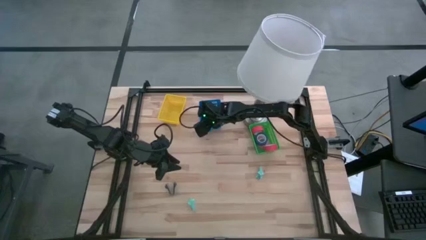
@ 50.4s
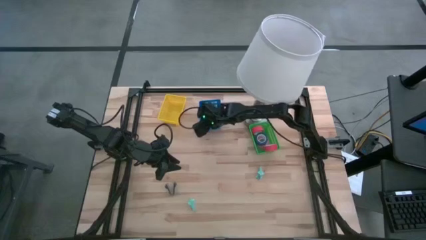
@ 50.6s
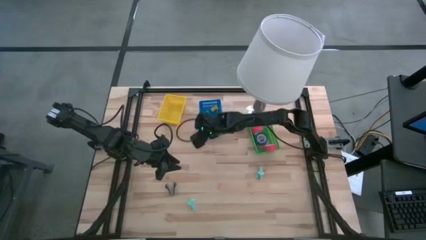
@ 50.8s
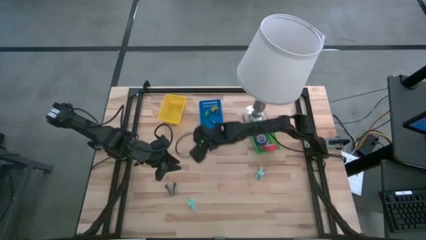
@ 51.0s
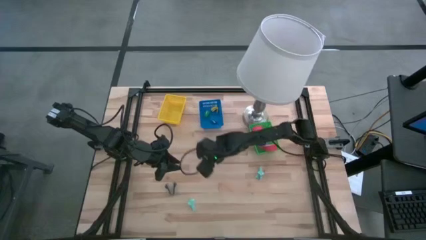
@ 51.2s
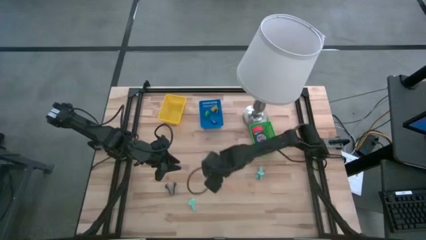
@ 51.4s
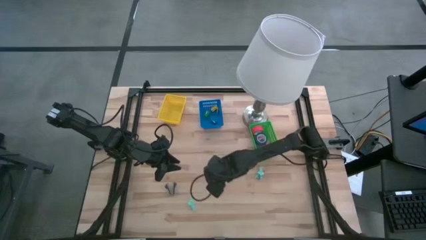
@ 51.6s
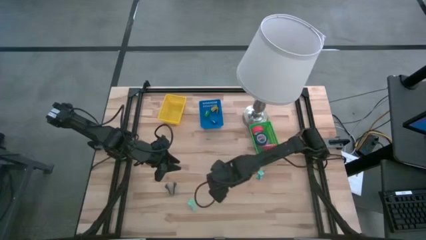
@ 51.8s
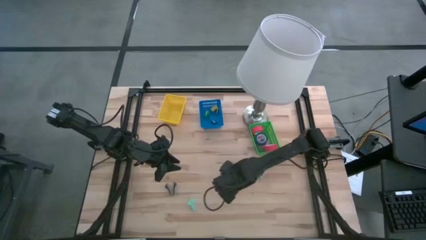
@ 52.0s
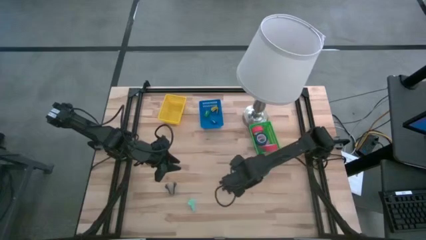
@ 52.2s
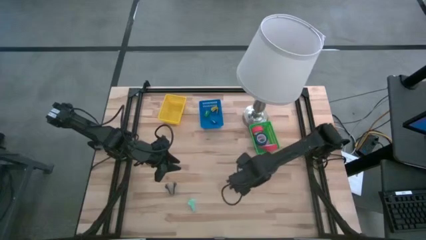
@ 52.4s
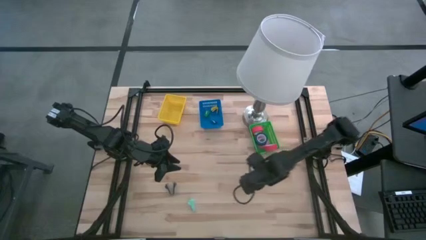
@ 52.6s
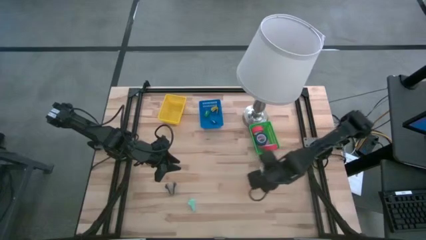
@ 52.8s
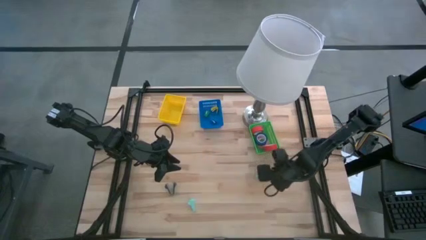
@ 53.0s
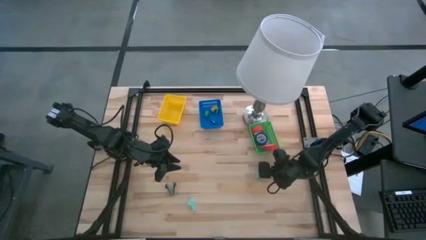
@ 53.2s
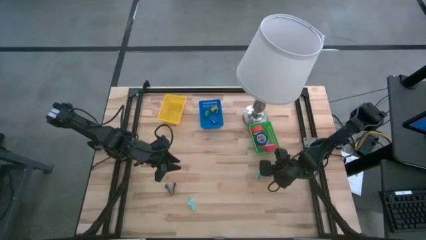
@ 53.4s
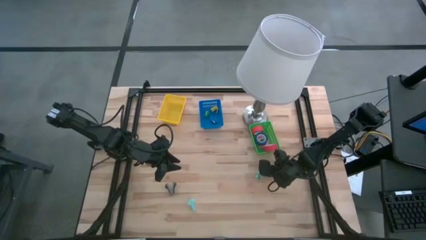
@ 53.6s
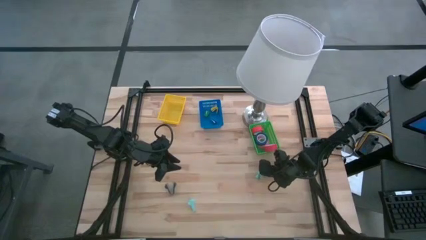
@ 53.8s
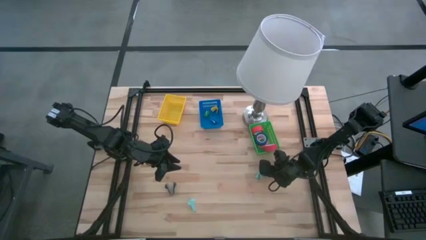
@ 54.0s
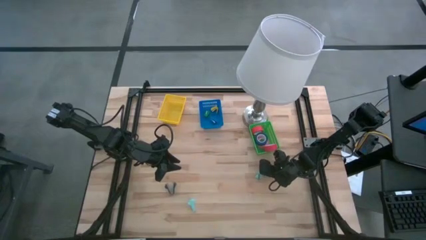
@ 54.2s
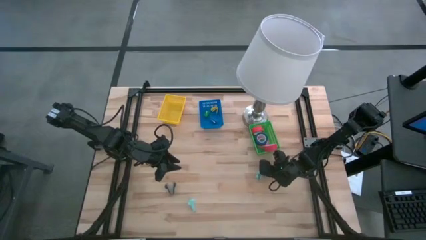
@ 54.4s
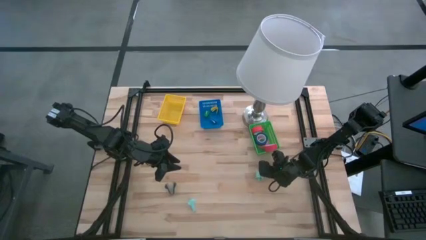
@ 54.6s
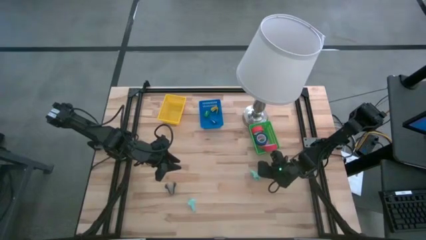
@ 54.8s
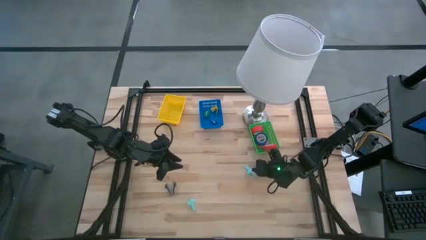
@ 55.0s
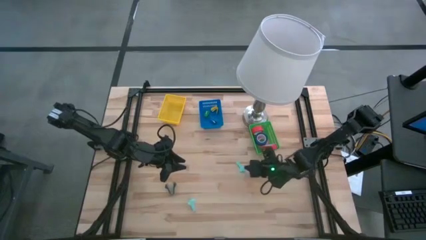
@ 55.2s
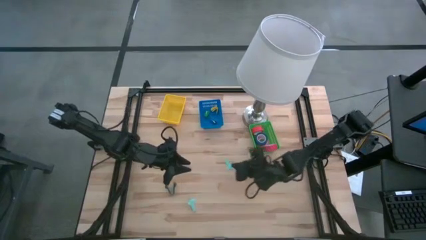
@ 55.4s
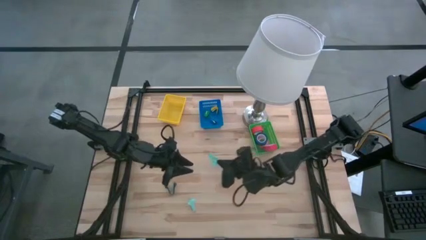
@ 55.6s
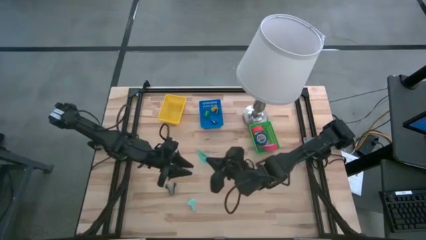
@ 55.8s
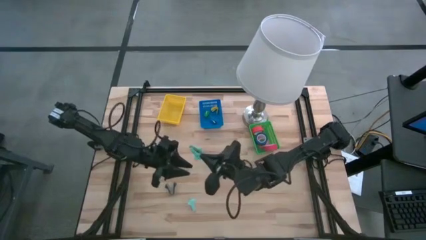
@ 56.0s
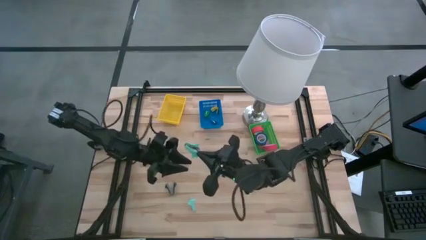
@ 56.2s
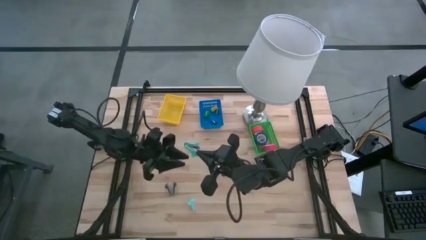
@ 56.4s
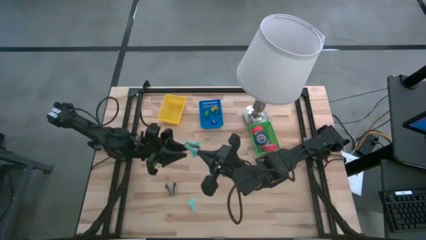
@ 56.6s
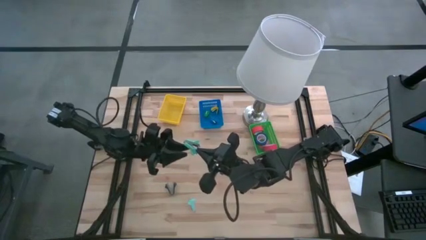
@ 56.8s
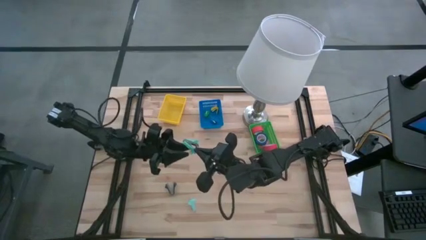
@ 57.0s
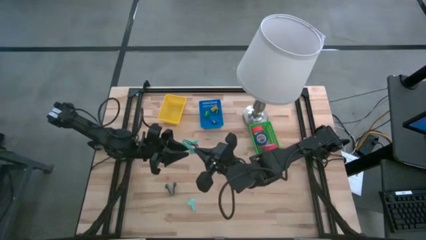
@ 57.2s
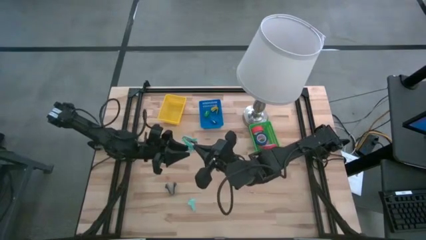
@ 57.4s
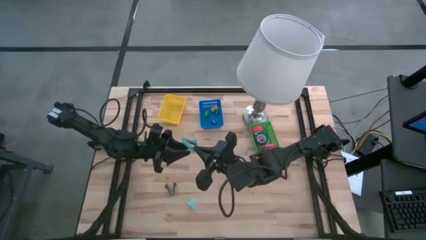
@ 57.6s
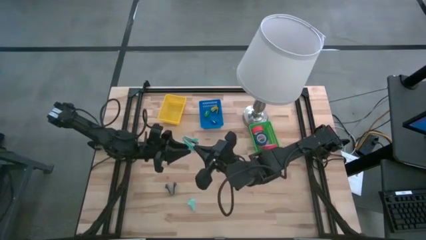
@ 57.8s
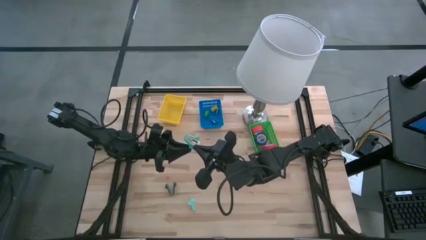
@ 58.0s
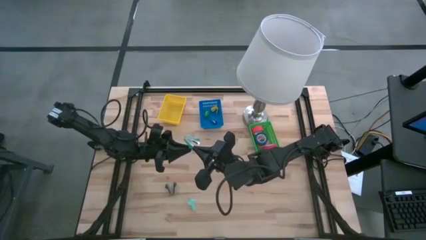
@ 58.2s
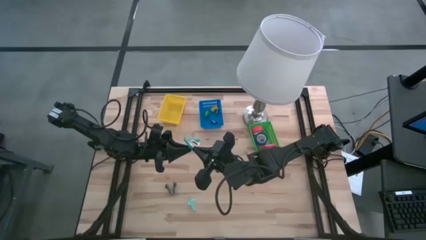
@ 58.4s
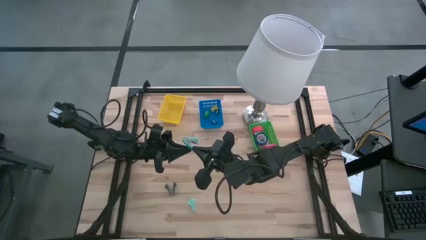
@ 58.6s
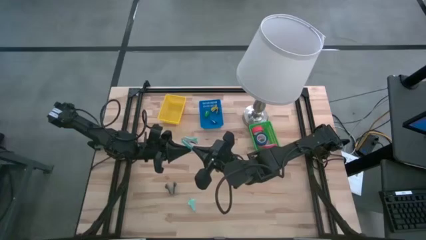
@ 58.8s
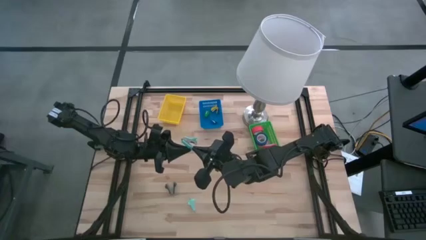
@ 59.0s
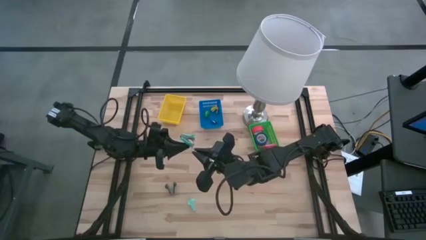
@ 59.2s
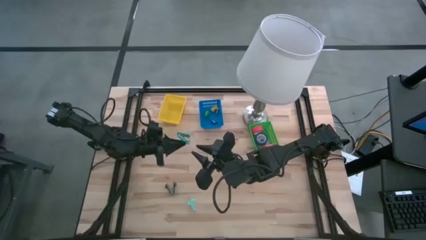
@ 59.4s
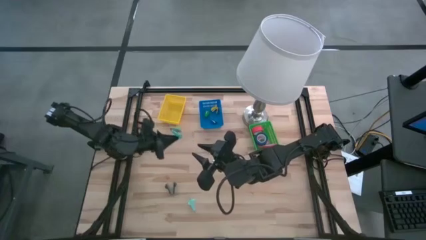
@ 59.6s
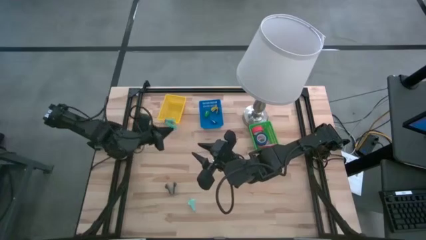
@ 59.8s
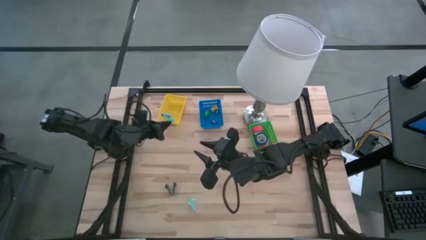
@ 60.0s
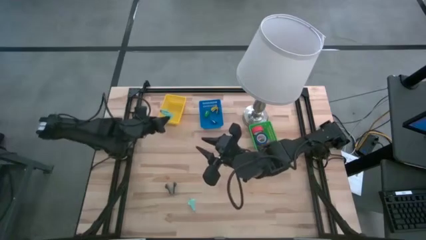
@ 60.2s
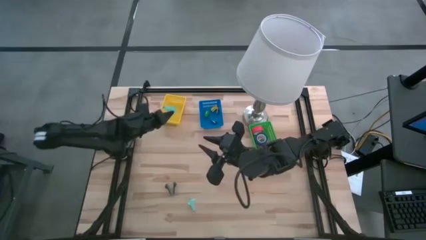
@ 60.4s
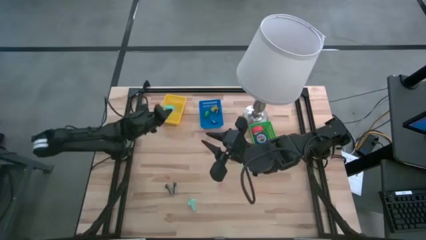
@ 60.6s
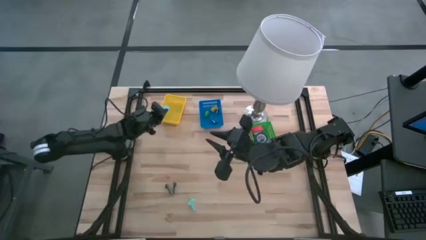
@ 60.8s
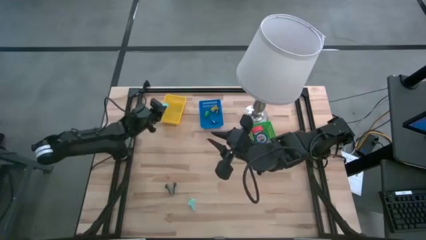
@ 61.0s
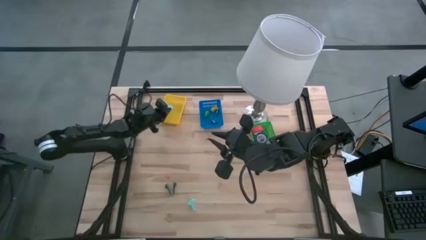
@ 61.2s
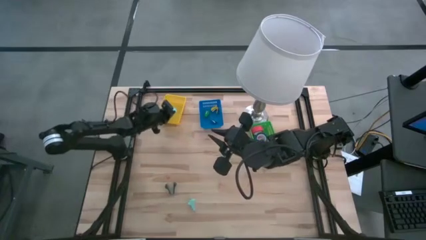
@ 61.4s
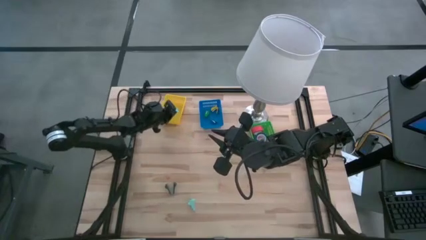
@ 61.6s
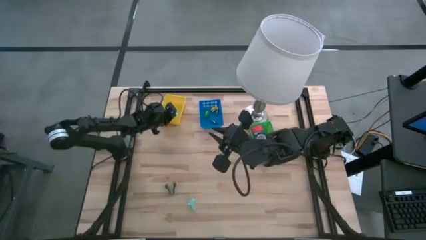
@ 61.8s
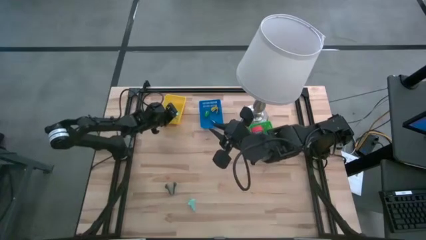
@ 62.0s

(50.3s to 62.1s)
Task: Pick and place Stapler, Stapler remover, tape
Put the top light blue green staple remover into the yellow bin

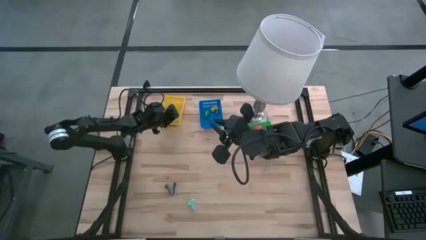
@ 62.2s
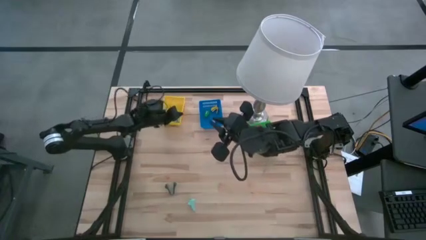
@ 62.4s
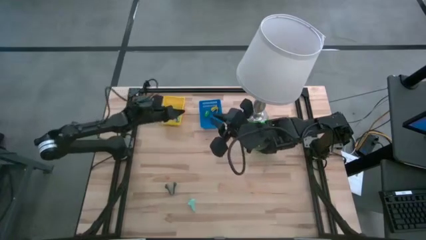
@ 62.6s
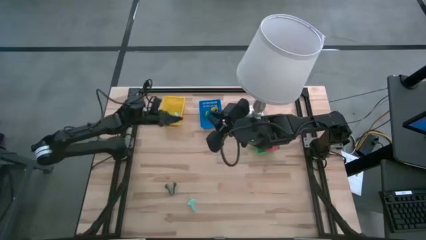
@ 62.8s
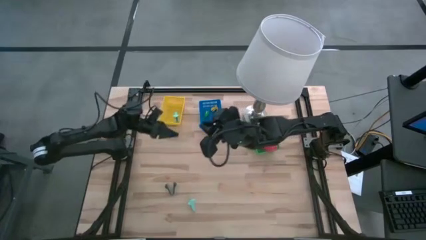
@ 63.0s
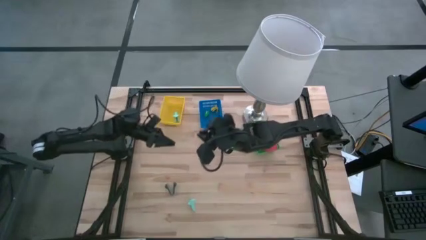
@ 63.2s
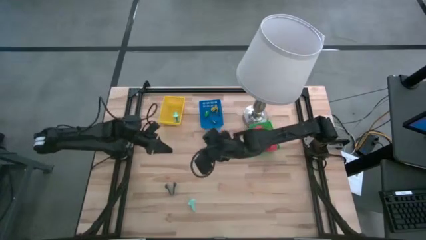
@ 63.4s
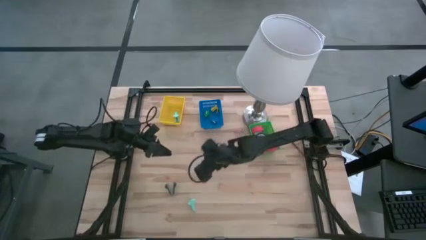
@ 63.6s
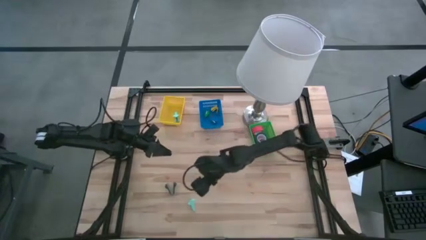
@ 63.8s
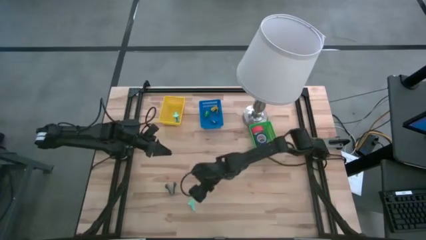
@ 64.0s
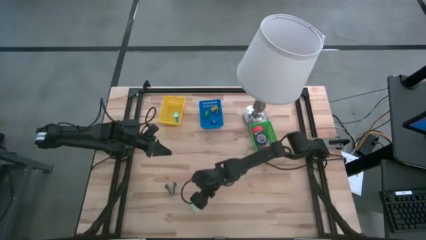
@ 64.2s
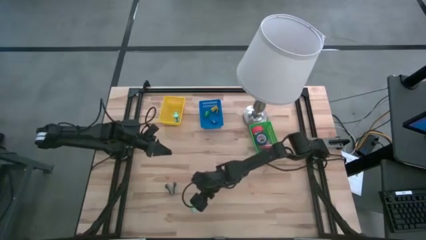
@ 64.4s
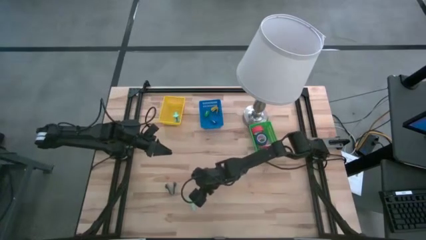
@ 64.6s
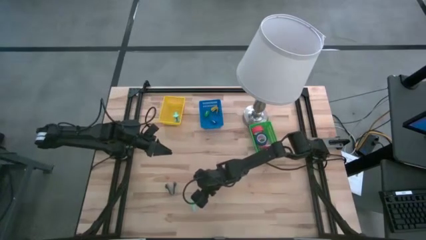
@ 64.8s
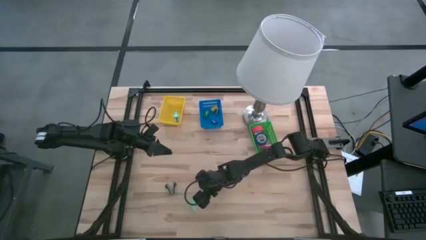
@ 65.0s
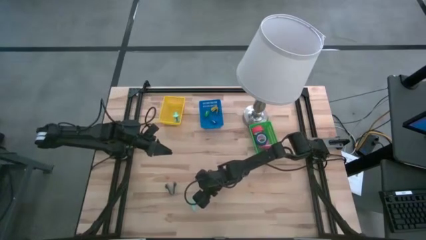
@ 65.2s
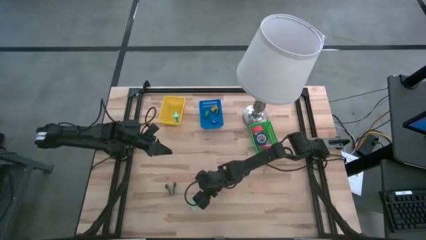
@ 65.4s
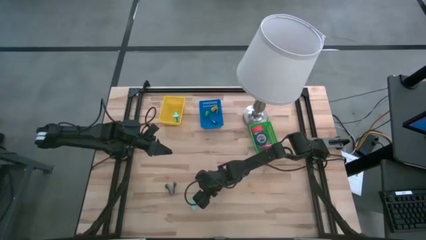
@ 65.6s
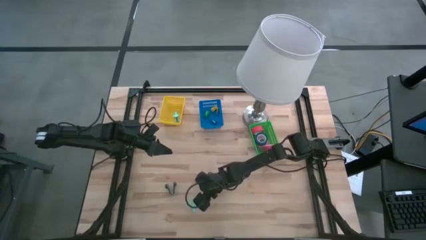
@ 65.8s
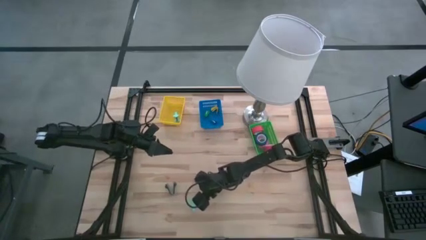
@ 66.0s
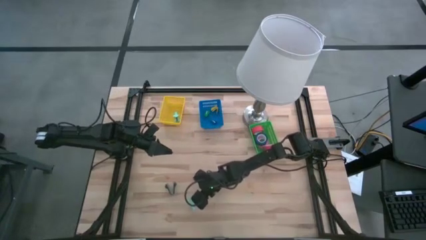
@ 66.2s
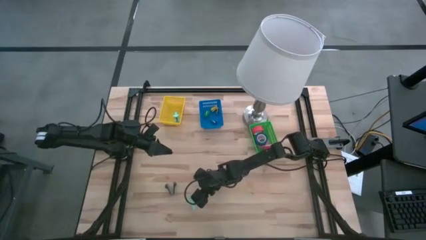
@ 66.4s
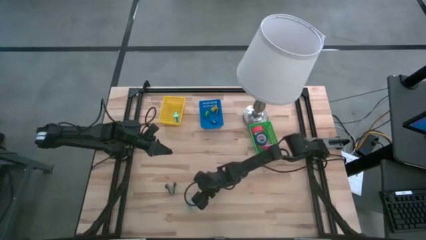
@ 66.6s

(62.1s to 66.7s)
Put the light blue green staple remover into the yellow bin
